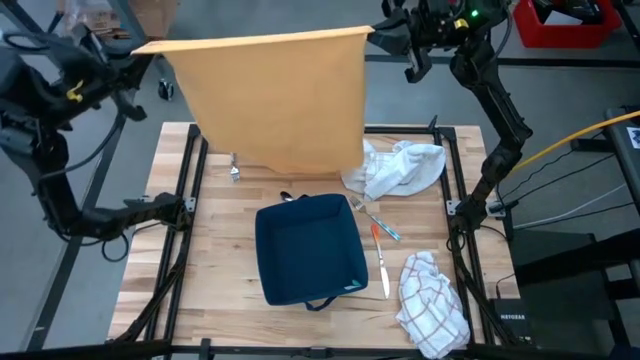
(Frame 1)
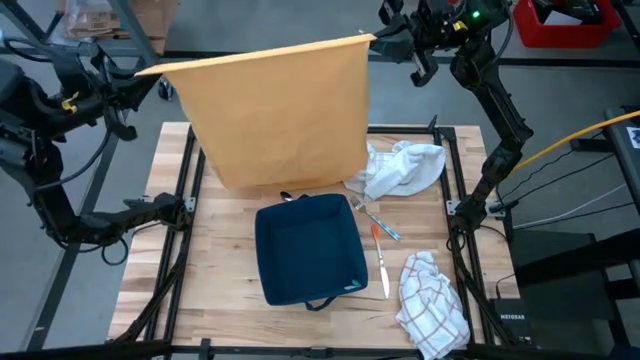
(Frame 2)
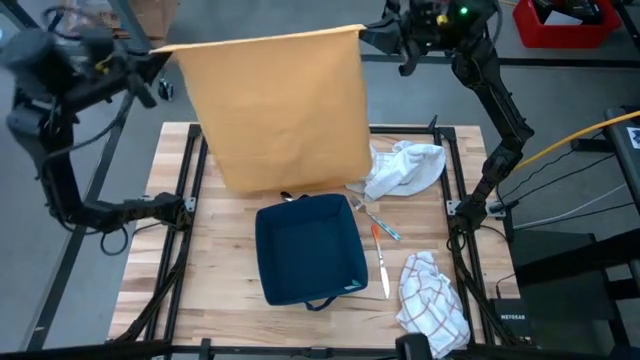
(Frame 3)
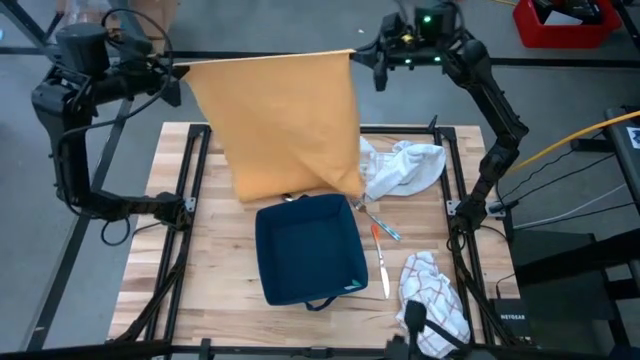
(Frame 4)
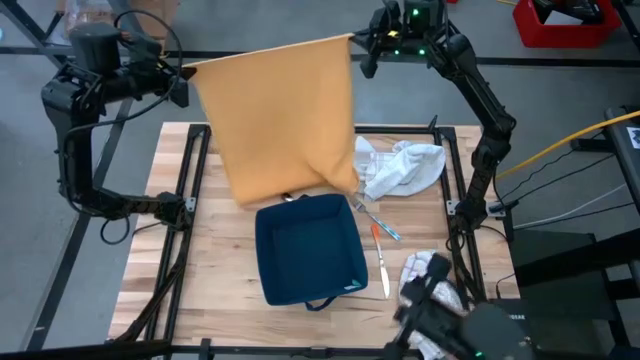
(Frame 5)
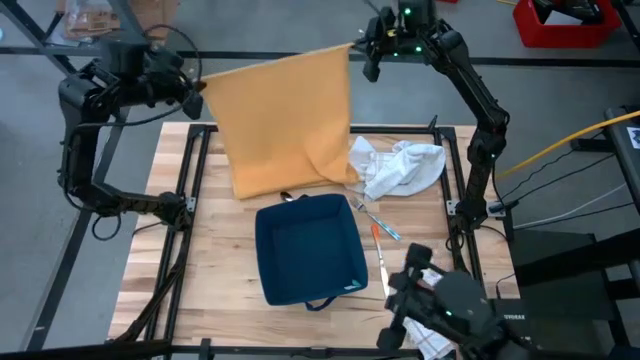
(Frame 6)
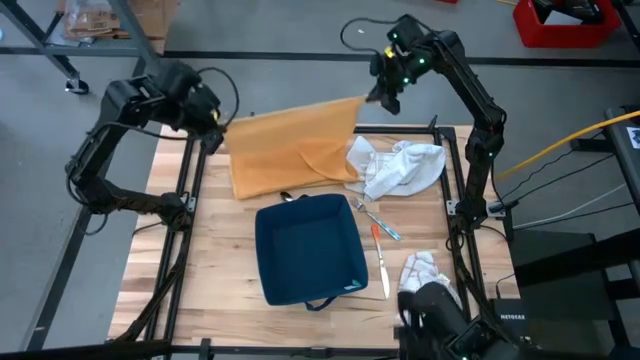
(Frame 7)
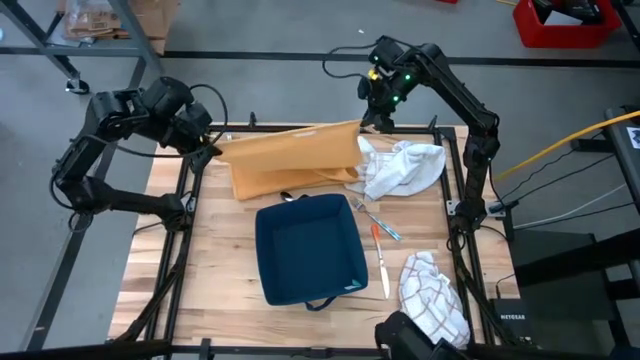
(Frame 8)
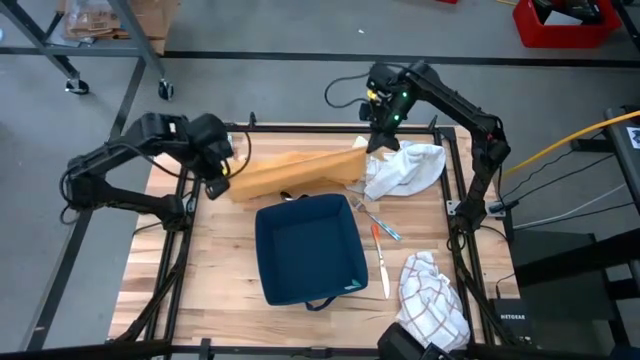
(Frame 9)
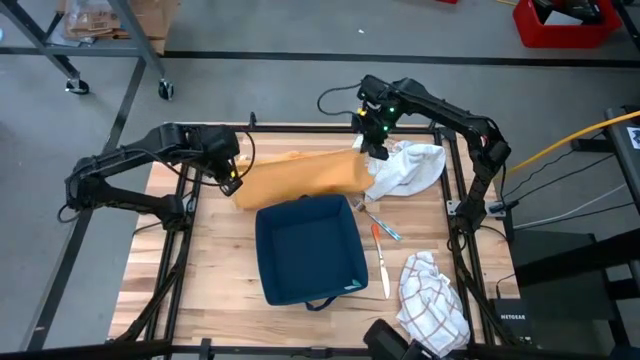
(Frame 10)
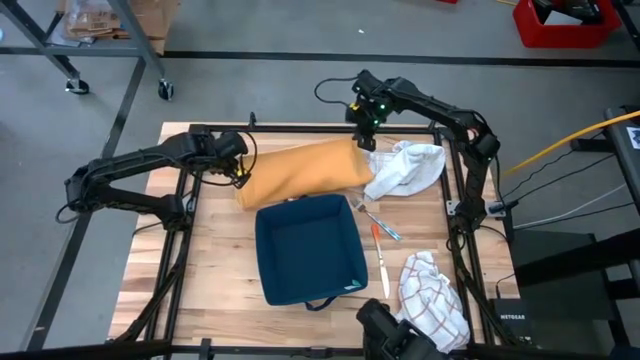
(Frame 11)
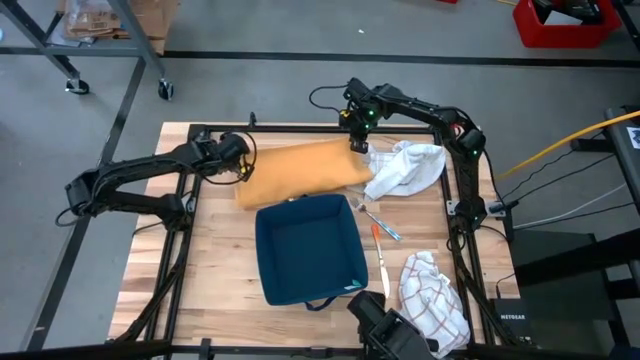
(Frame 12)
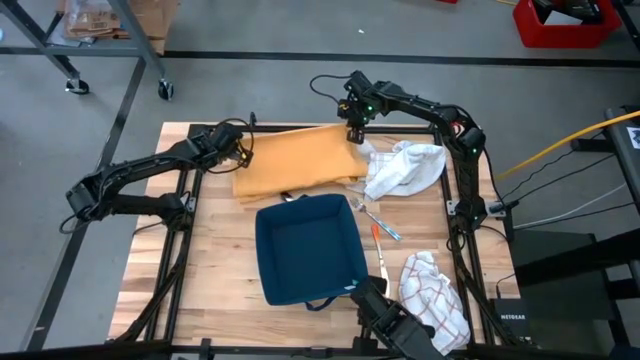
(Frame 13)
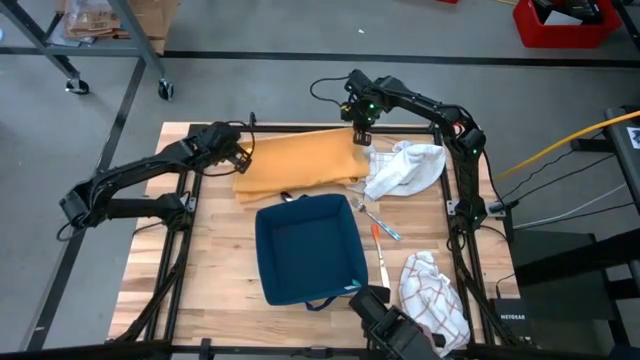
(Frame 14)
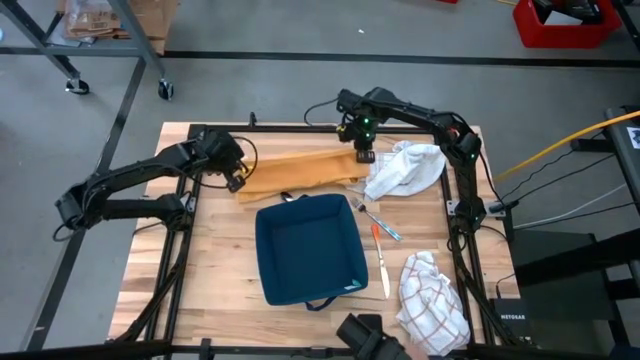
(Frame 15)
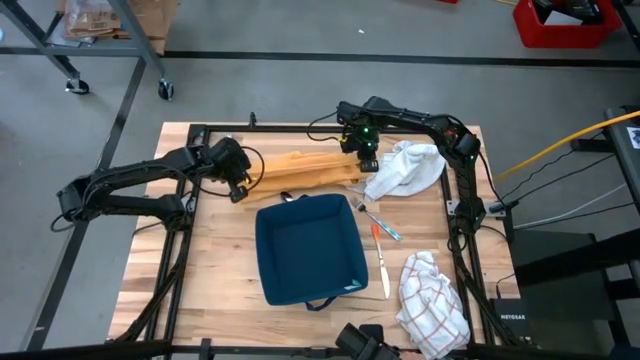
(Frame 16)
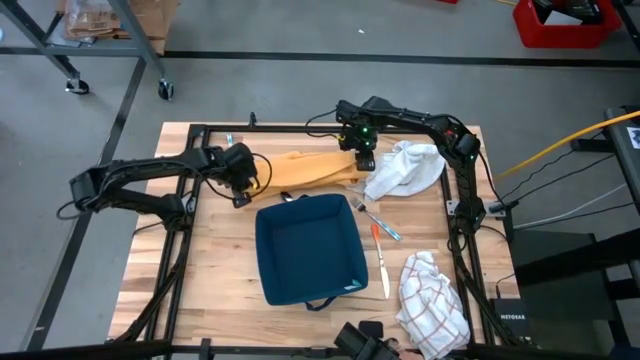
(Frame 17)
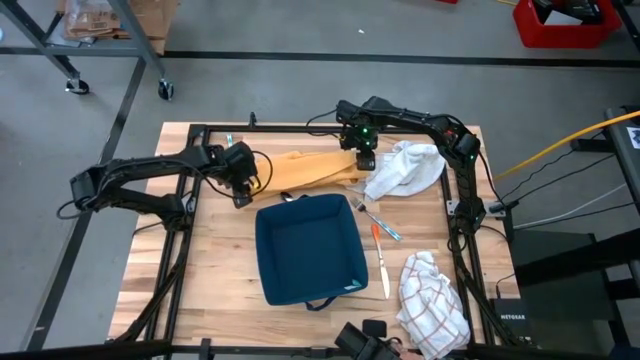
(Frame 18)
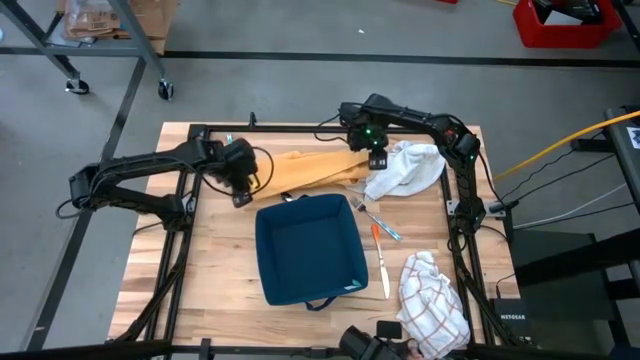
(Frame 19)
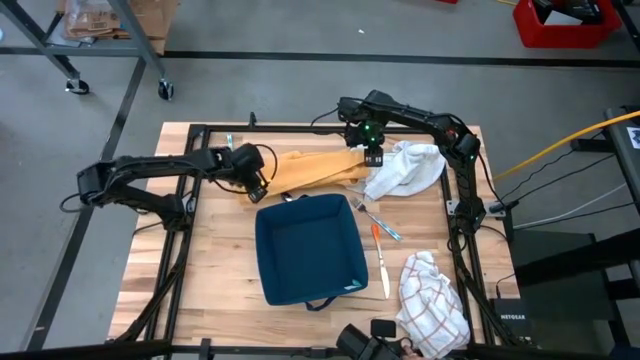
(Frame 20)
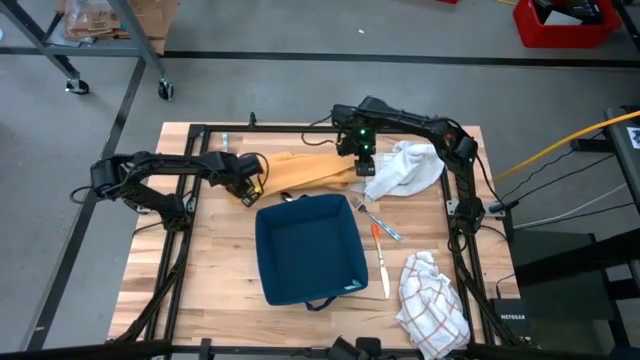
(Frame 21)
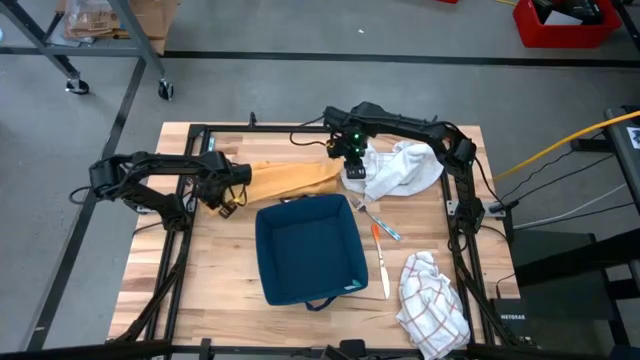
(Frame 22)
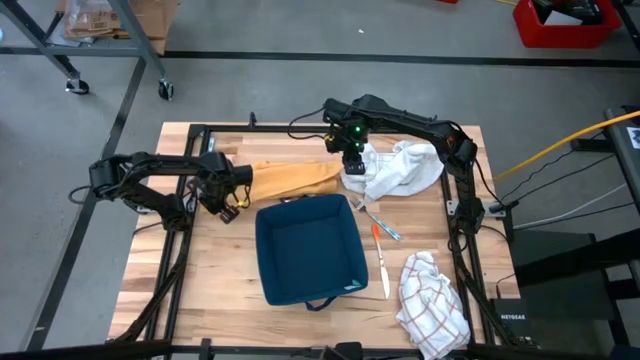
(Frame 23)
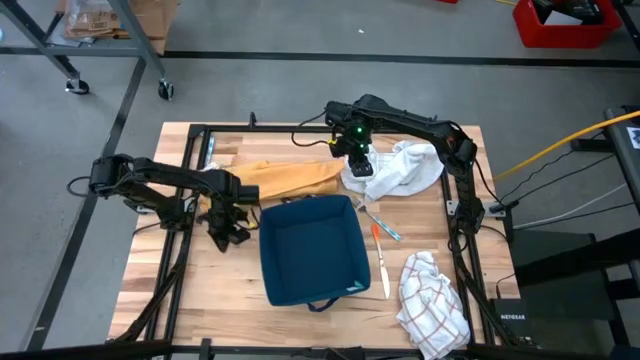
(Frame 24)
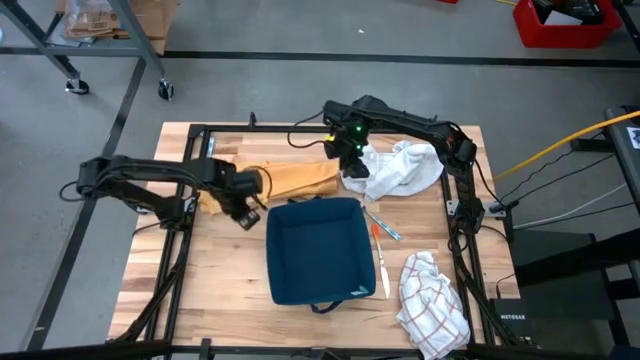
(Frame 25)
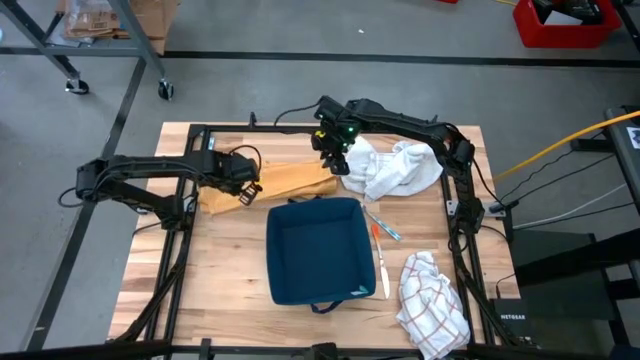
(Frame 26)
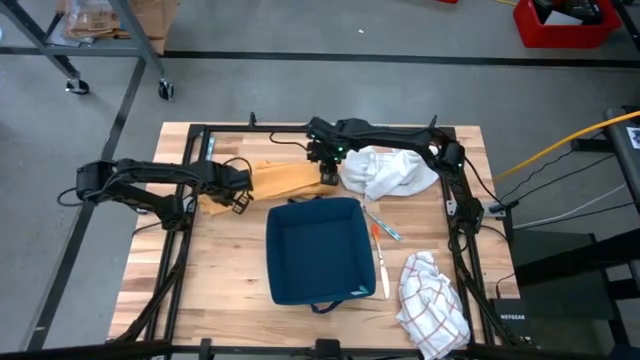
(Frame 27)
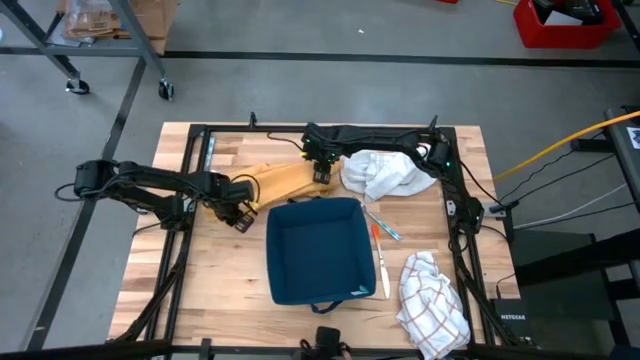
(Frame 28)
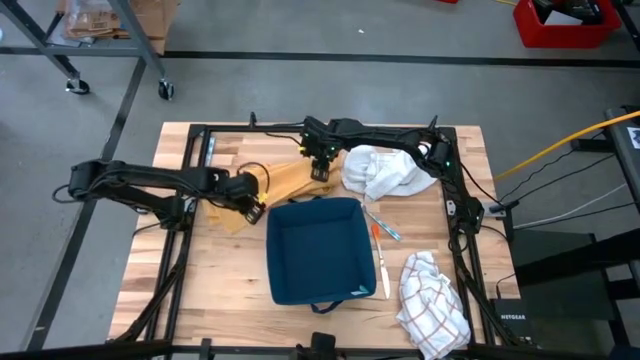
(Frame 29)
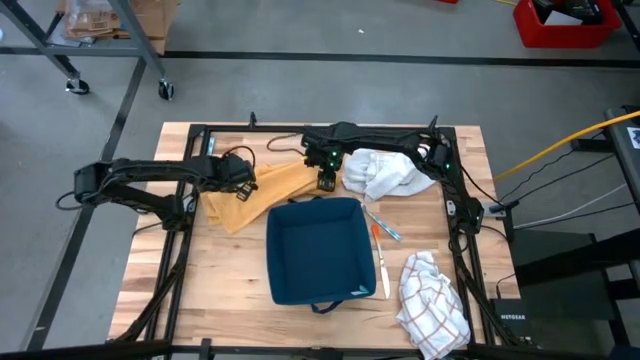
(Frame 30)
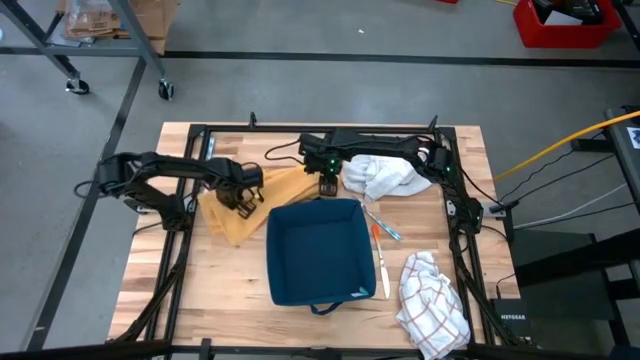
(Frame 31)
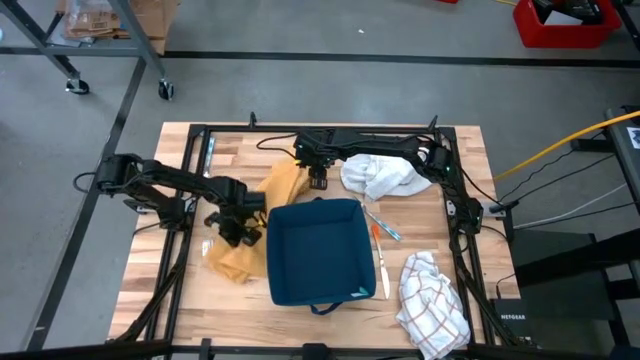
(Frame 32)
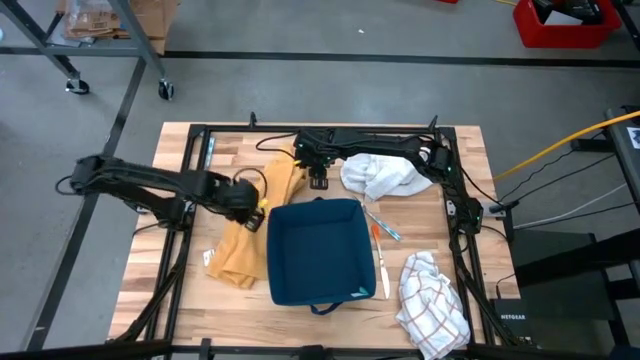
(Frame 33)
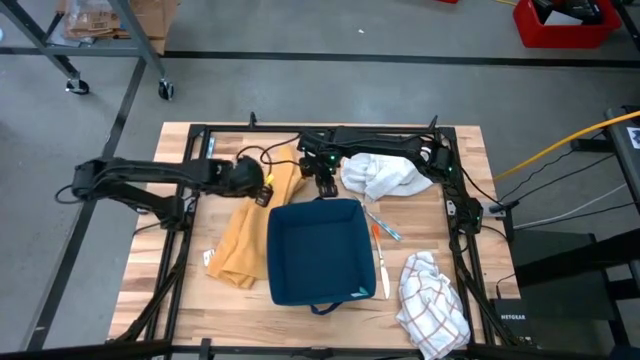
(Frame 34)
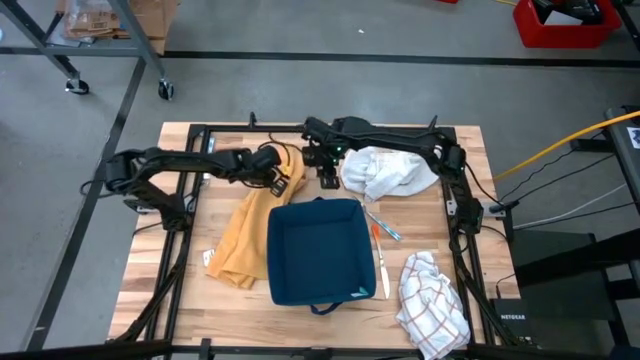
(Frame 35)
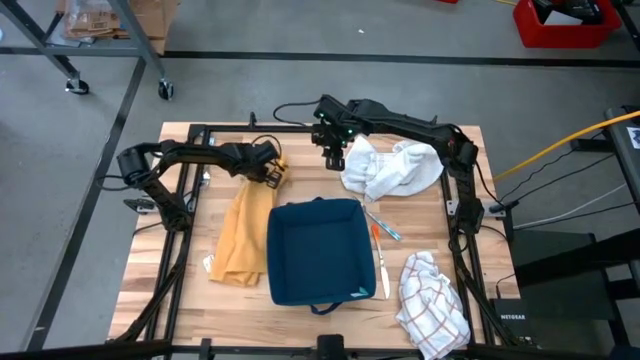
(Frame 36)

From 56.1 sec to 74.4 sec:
Task: Fold towel
Fold the yellow towel

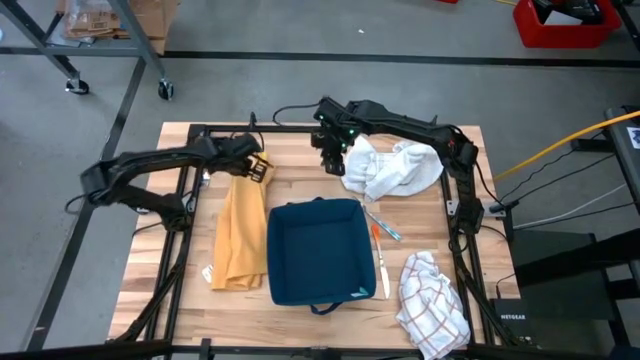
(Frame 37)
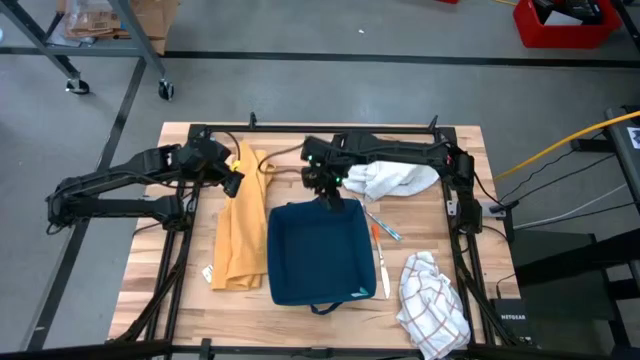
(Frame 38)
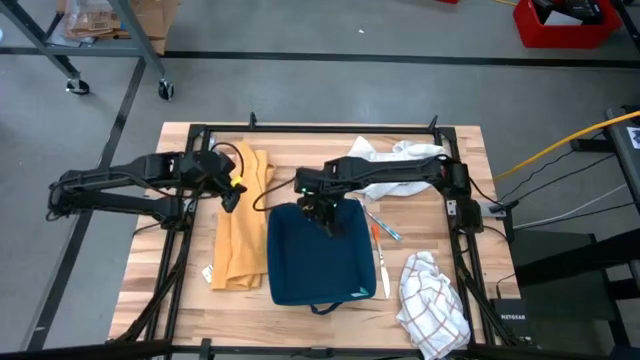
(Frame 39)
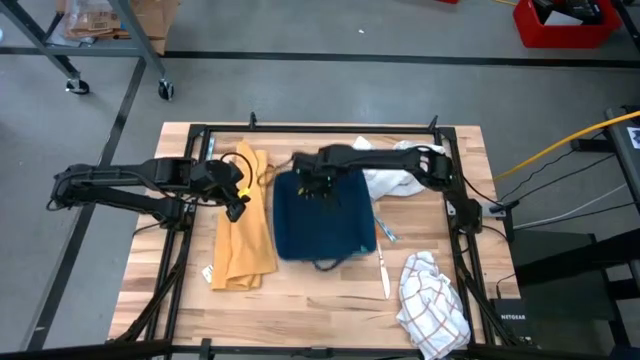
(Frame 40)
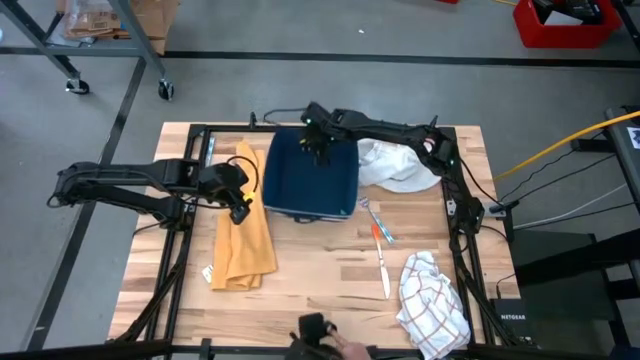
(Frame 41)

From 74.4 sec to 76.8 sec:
Move the blue laundry organizer to the top center of the table
